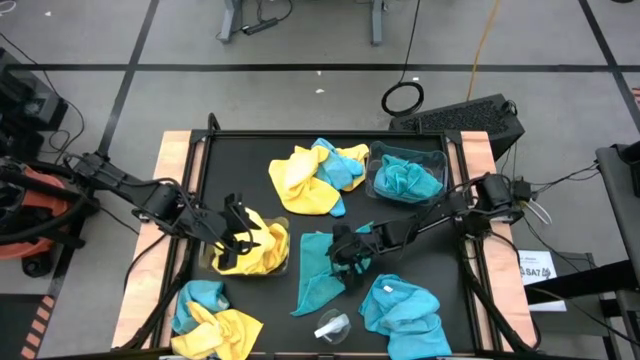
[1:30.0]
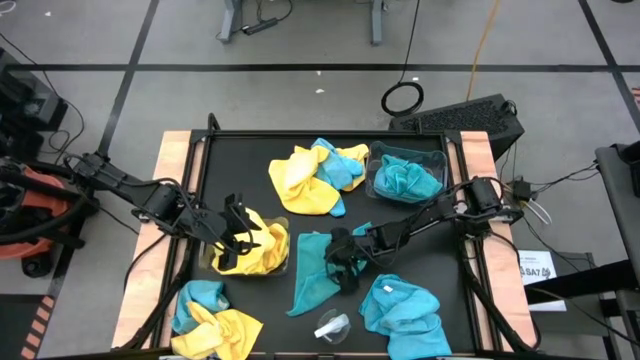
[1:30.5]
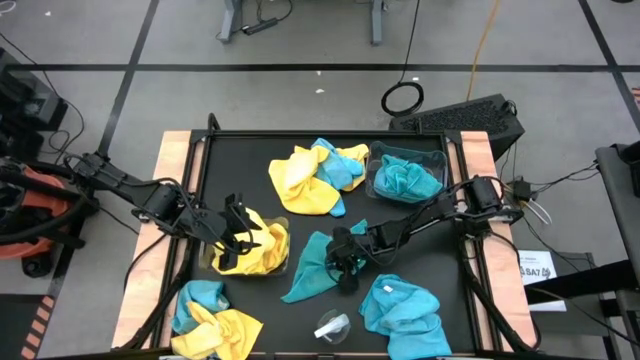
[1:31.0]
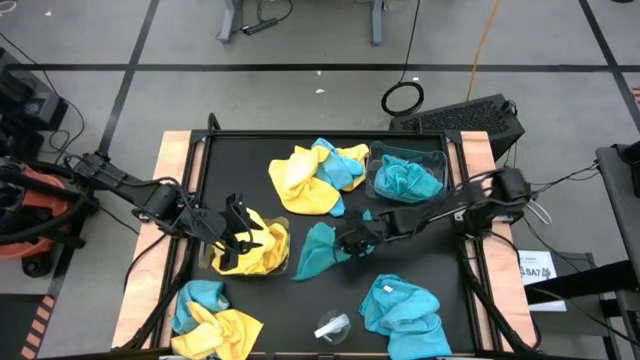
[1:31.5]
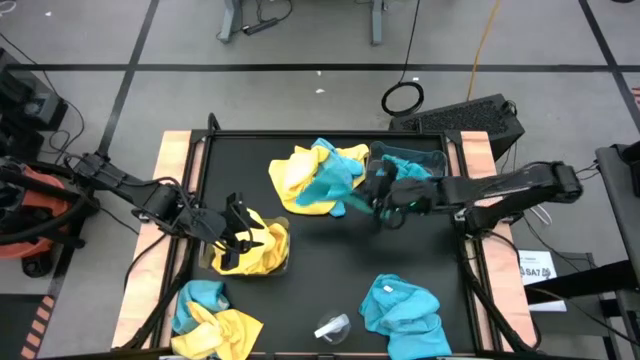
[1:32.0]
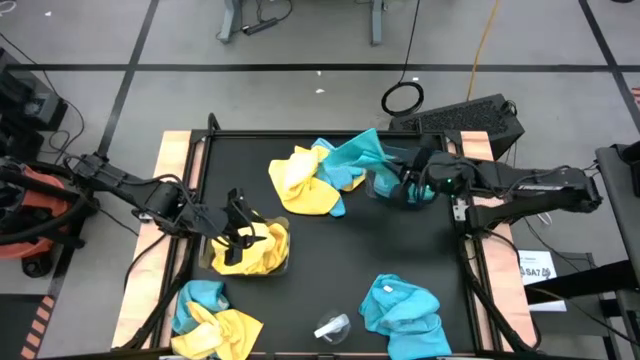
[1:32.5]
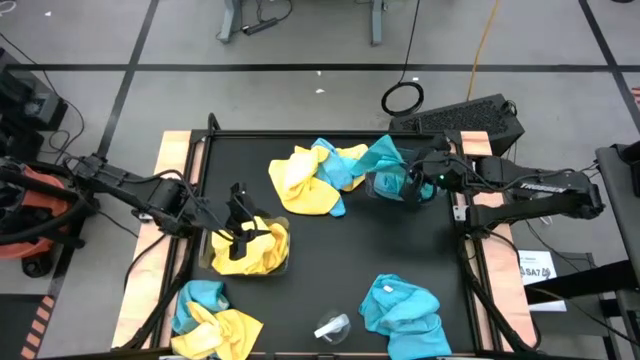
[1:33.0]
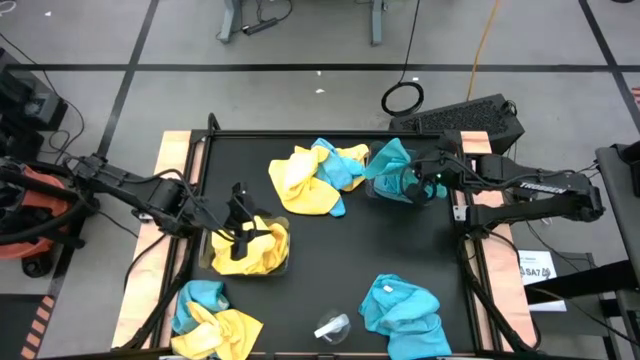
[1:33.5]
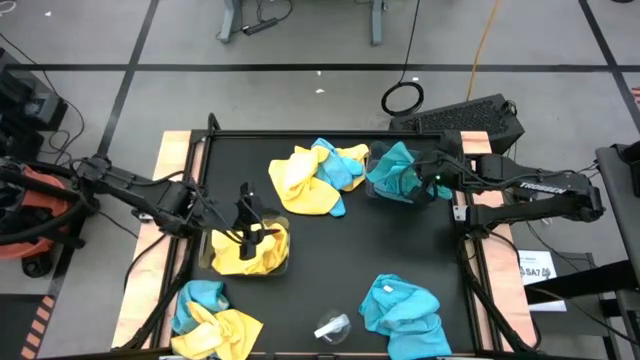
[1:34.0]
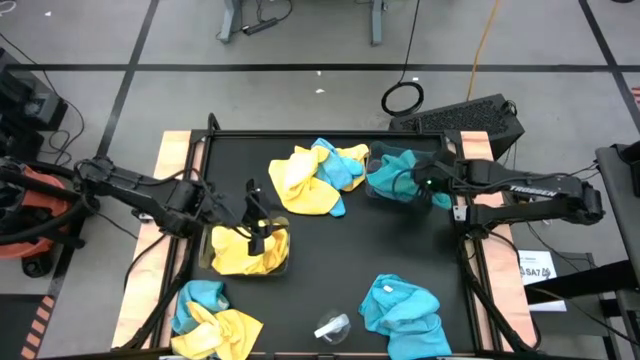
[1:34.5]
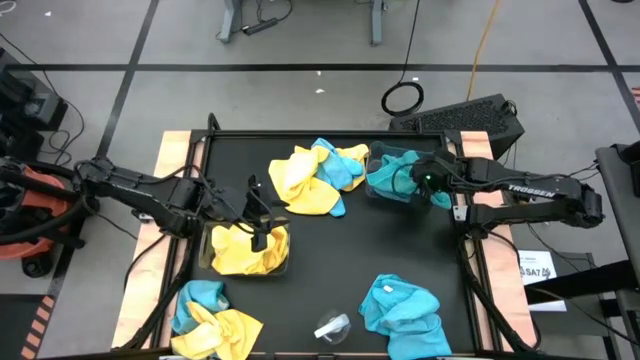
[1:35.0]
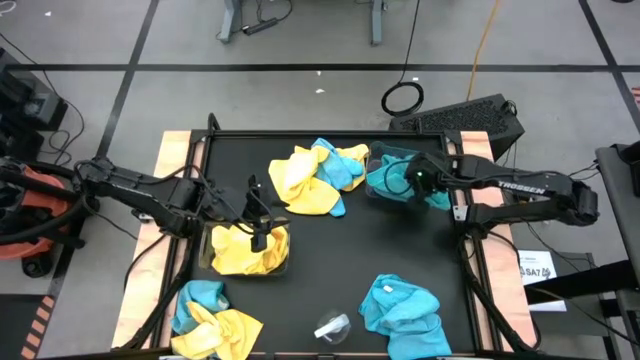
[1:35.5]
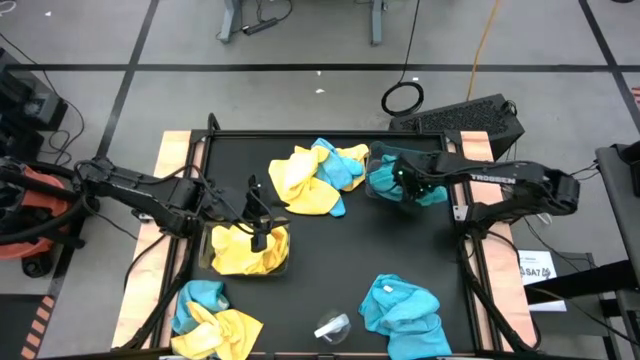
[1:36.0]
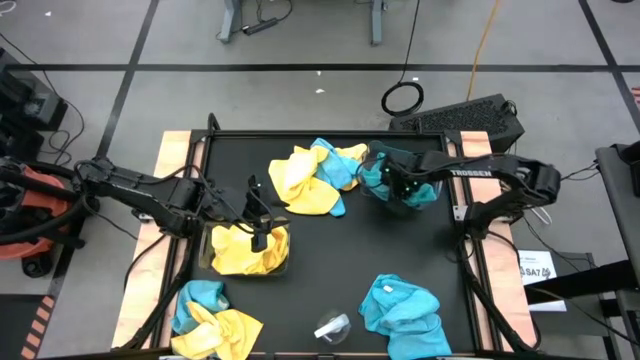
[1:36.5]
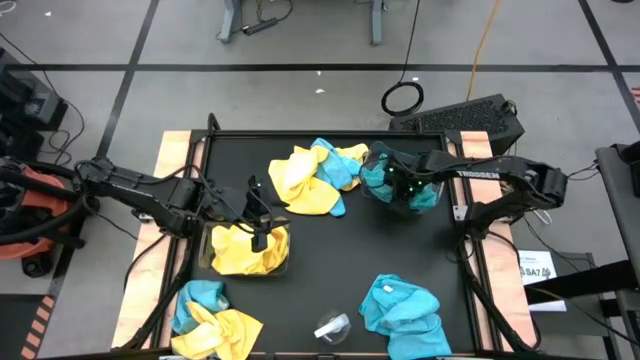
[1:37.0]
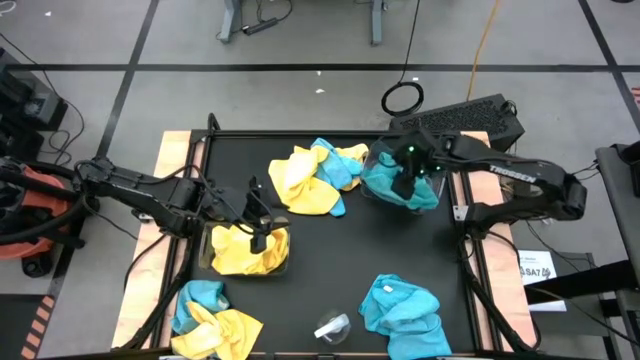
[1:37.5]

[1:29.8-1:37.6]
Task: Sort microfiber towel by color & place in baskets
Put the blue microfiber towel into the top transparent bin

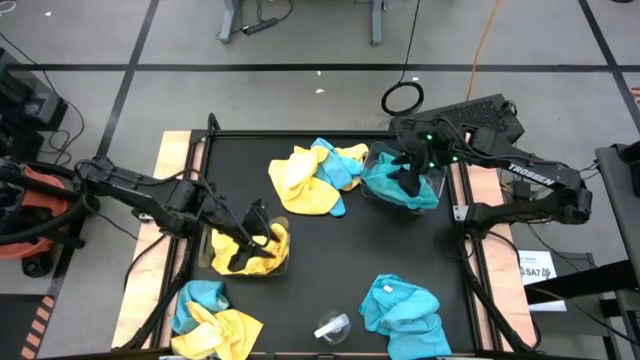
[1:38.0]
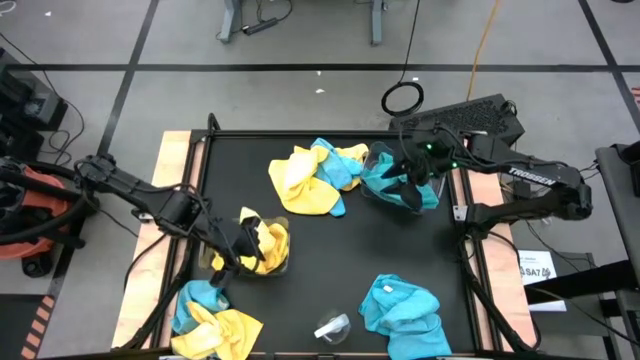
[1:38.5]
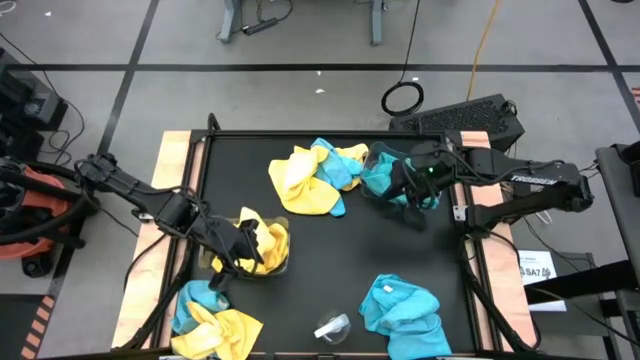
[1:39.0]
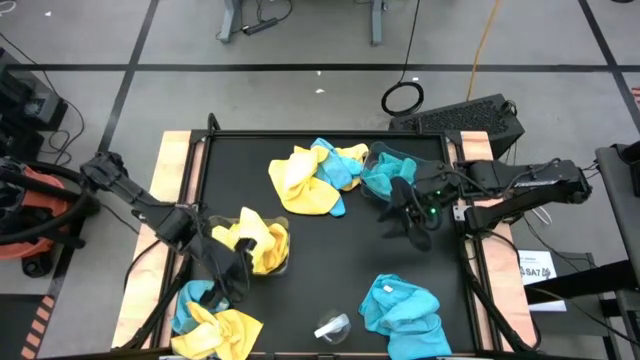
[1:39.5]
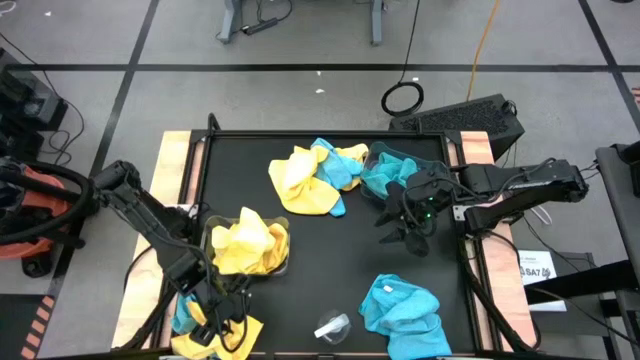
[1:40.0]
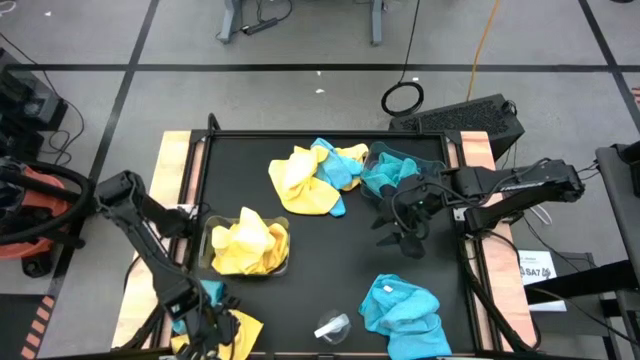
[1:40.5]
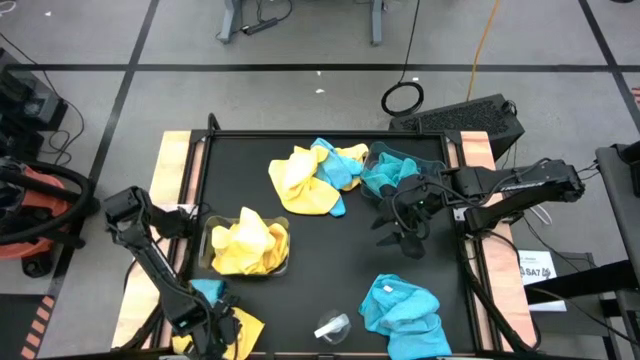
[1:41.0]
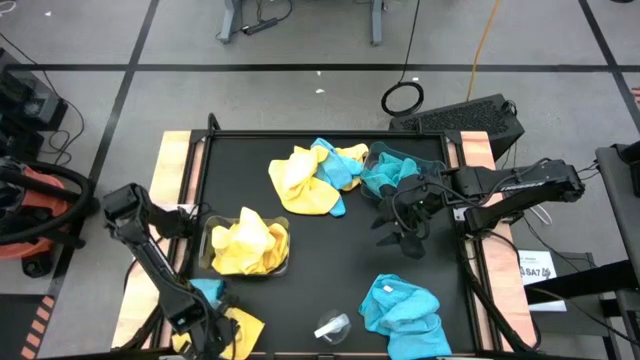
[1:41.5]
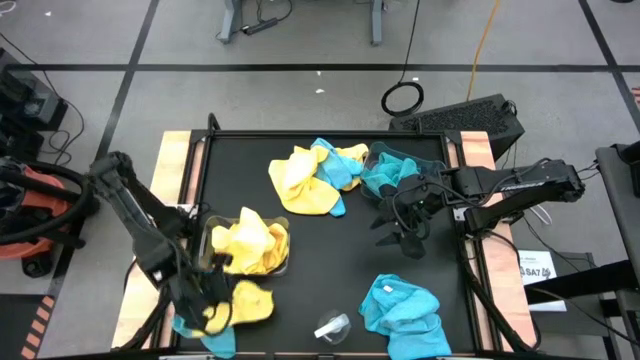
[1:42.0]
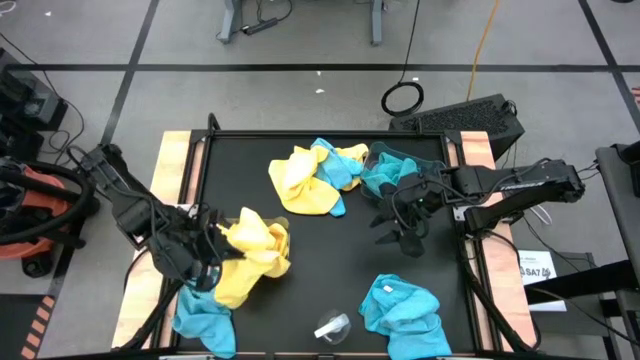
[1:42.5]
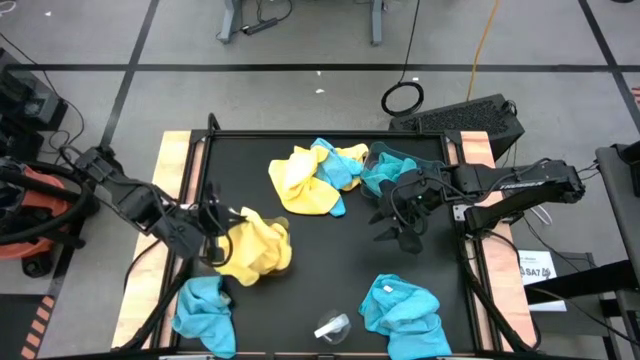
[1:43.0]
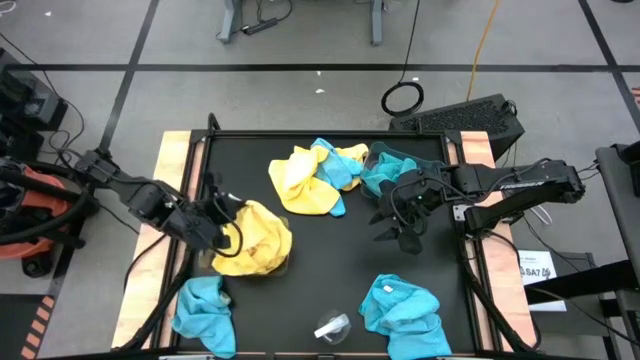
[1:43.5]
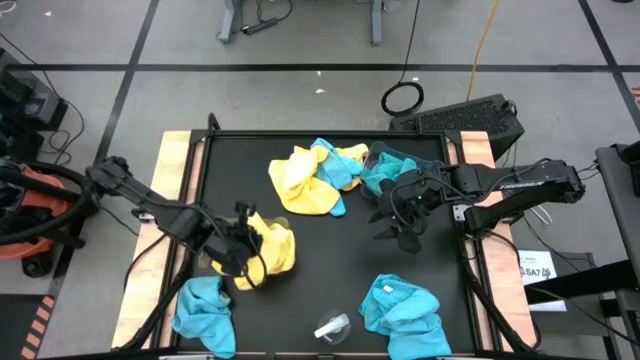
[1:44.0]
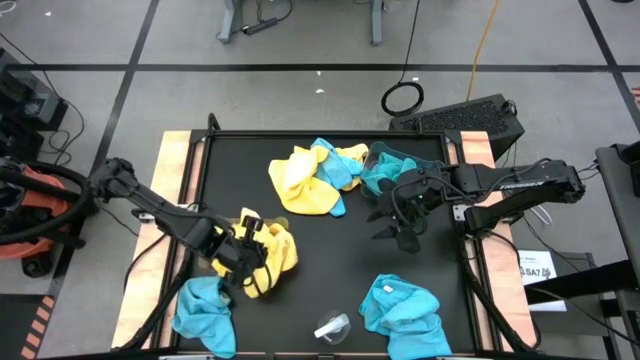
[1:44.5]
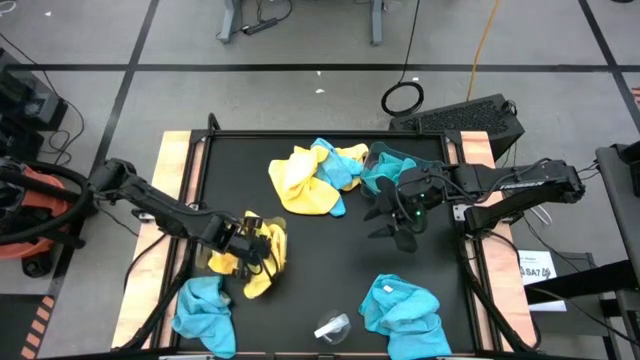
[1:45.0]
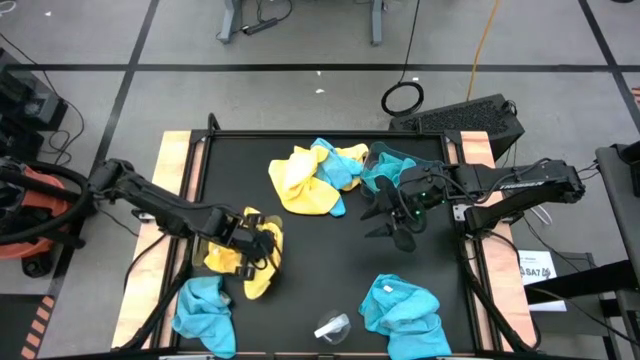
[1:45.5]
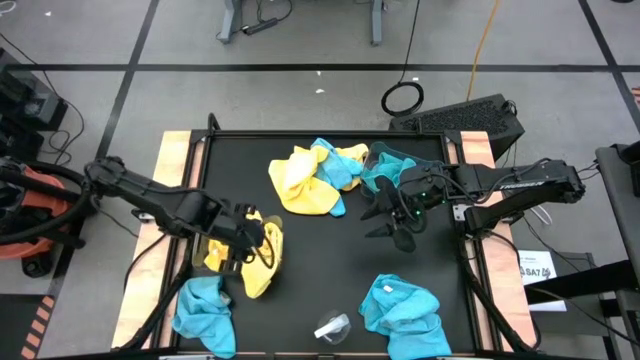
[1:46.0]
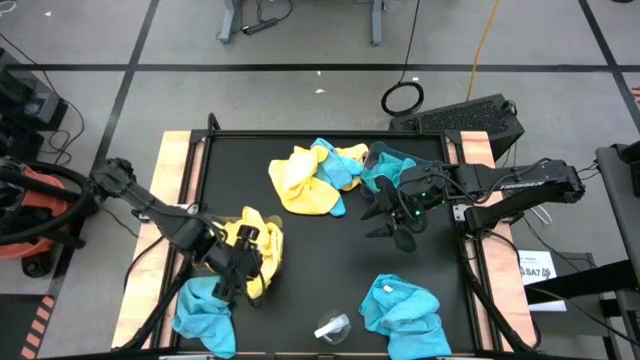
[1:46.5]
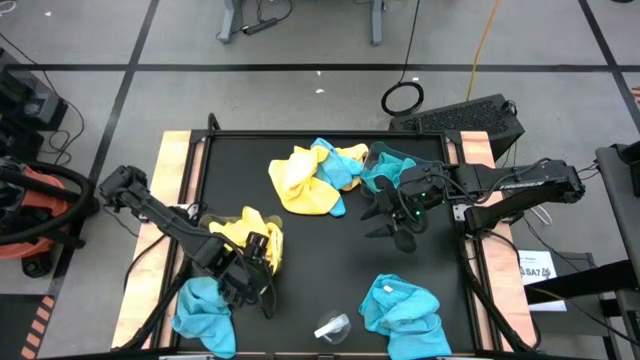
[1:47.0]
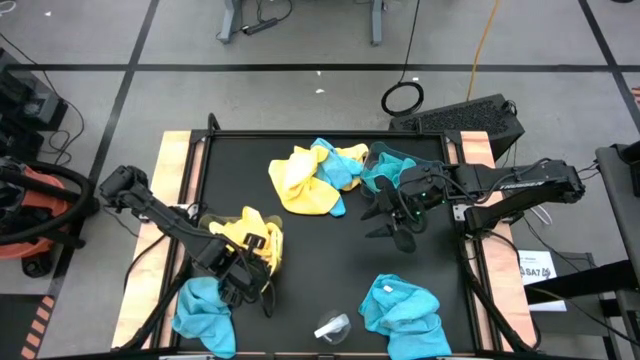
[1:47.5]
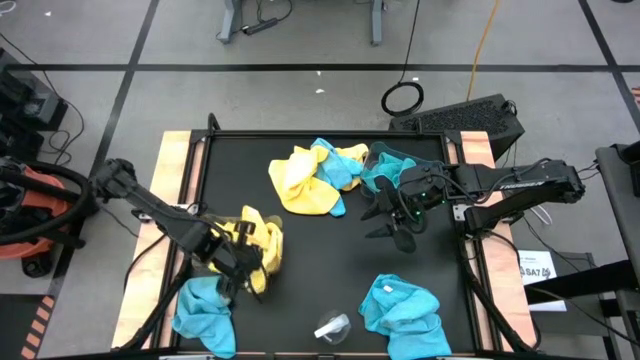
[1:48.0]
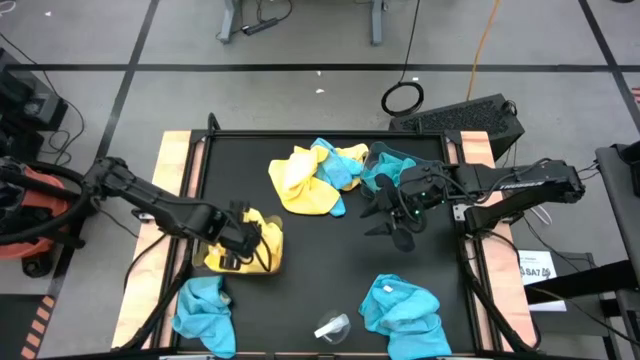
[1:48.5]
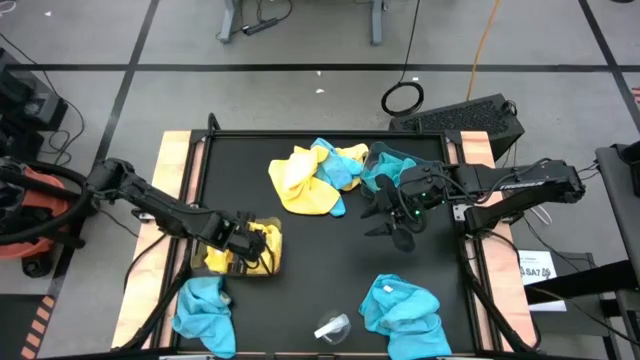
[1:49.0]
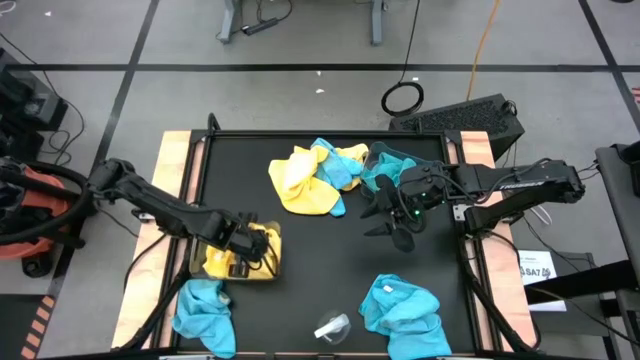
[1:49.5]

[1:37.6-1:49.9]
Put the yellow microfiber towel into the bottom transparent bin
